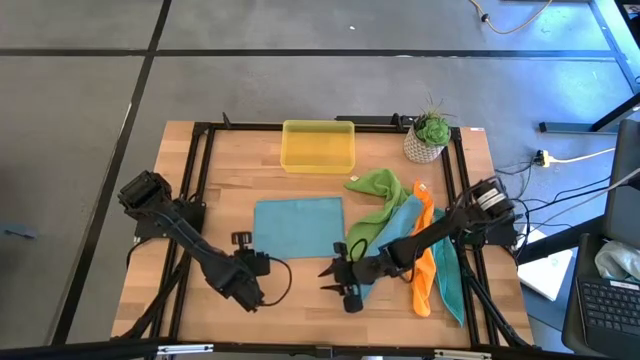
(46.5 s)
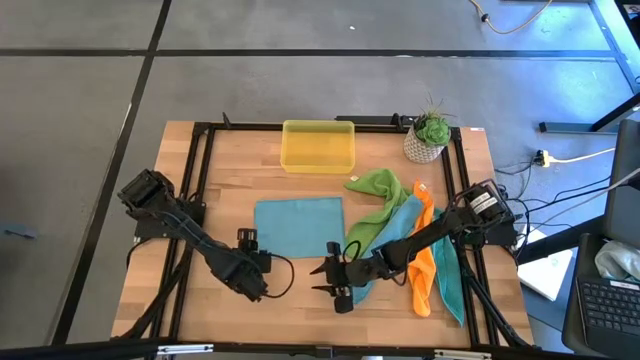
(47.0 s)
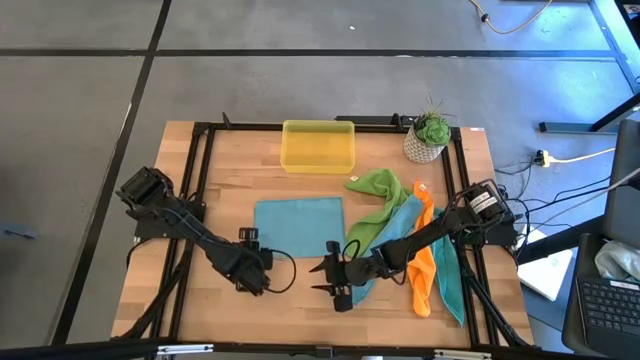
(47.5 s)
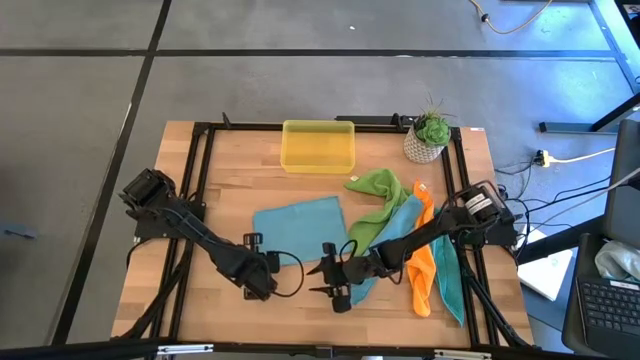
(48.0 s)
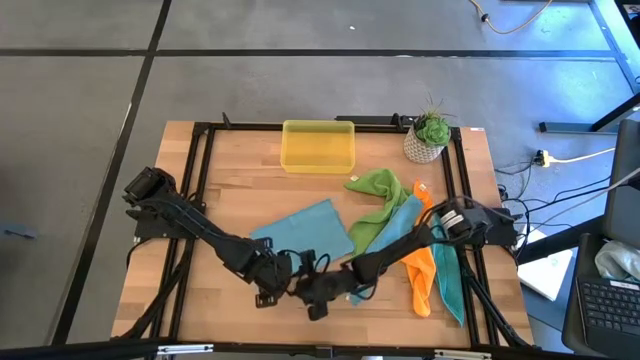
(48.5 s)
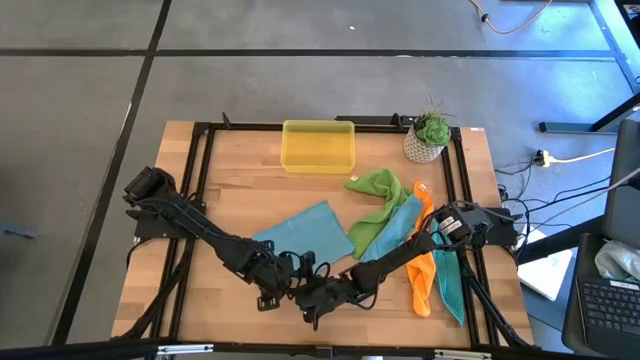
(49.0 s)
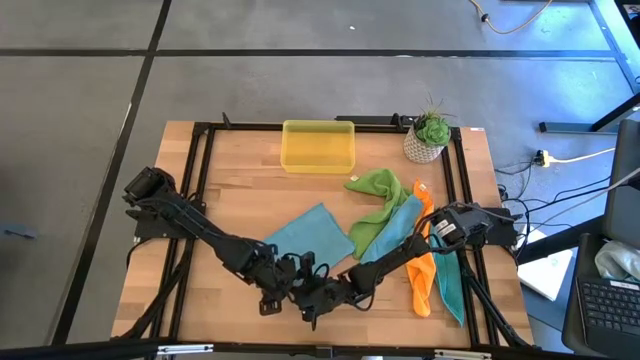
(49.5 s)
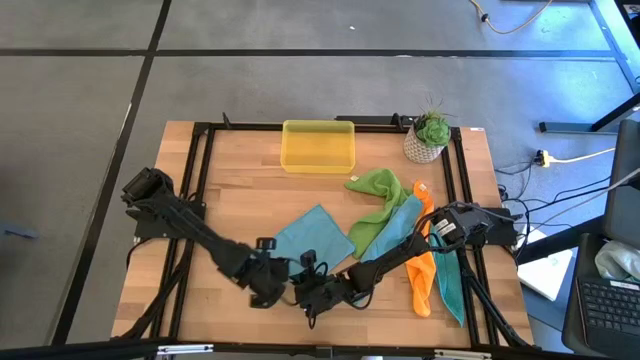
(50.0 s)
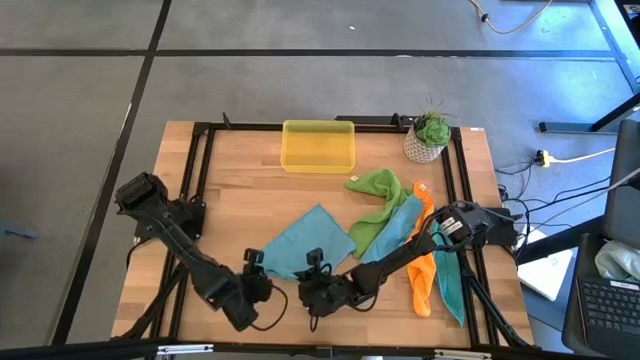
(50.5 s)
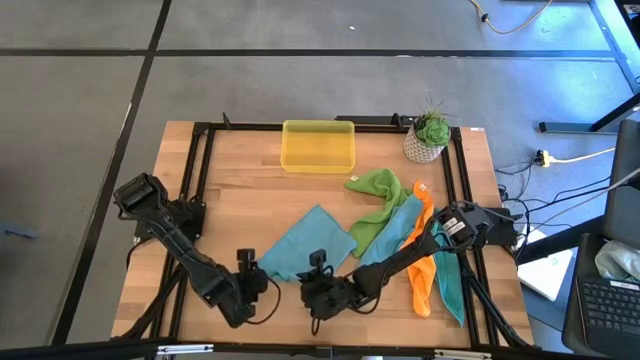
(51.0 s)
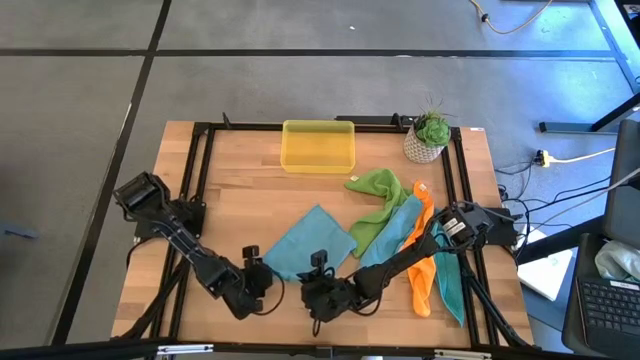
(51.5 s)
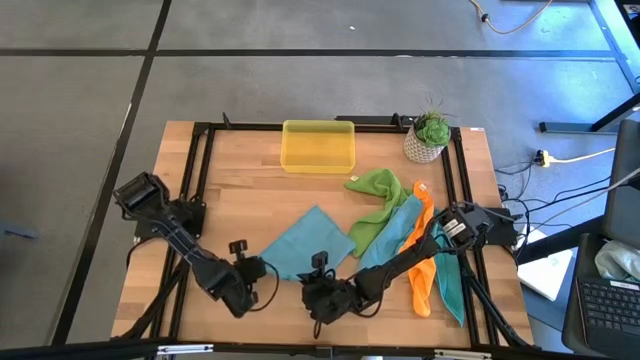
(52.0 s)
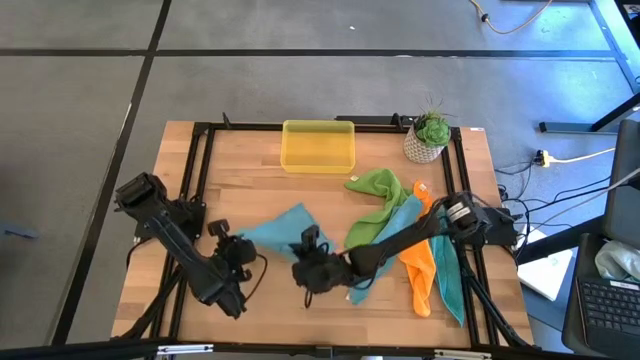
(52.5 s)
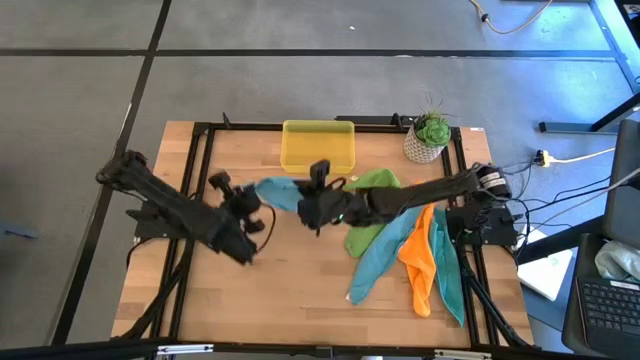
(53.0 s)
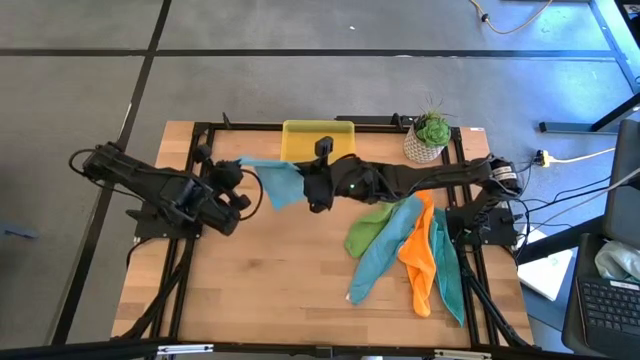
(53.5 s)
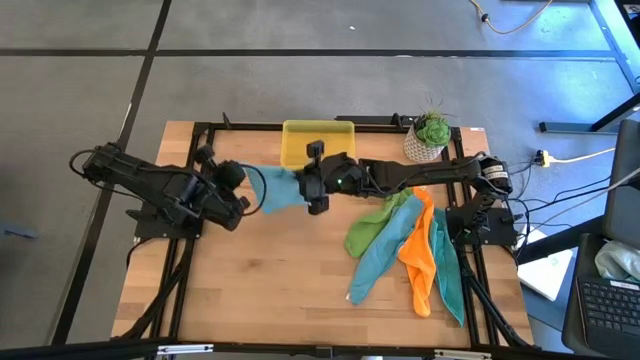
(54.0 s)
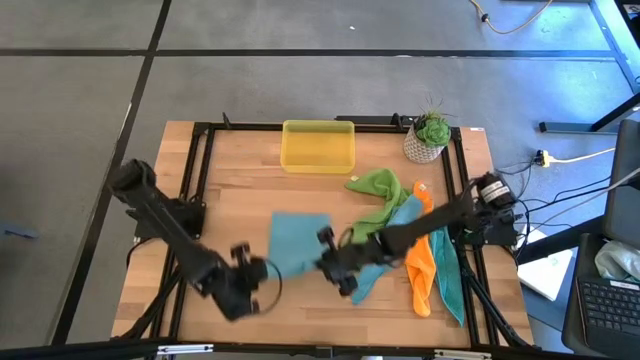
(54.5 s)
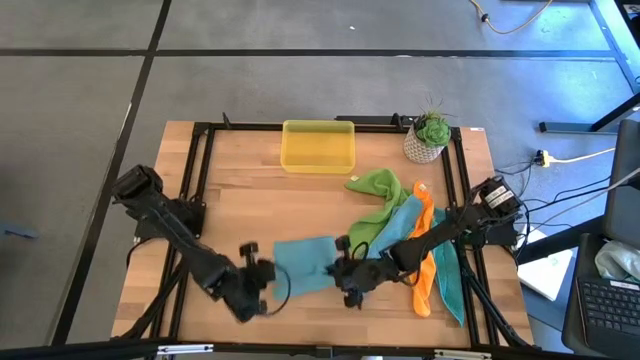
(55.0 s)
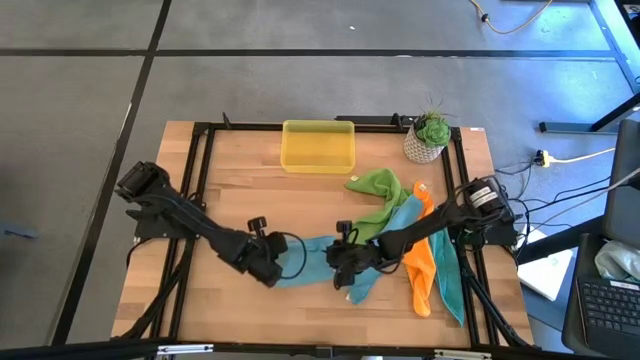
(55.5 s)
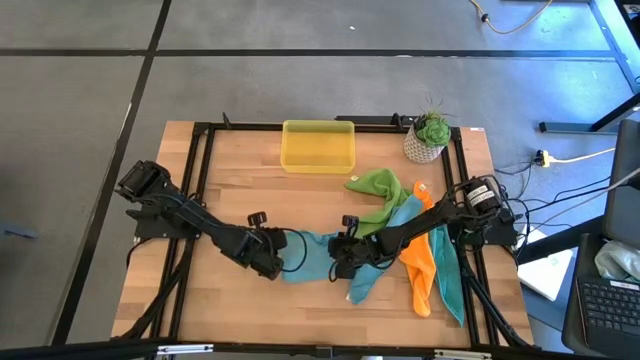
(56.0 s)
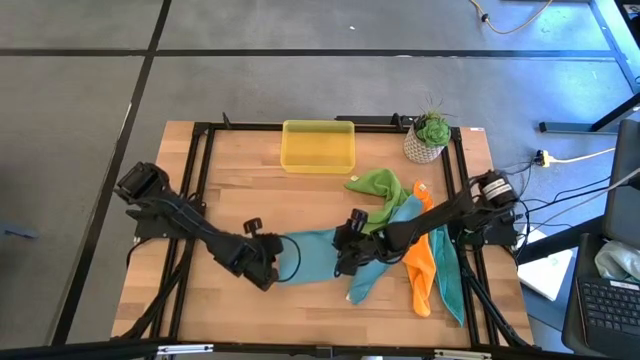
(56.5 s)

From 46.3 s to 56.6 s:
Task: Fold microfiber towels
Fold the left blue cloth

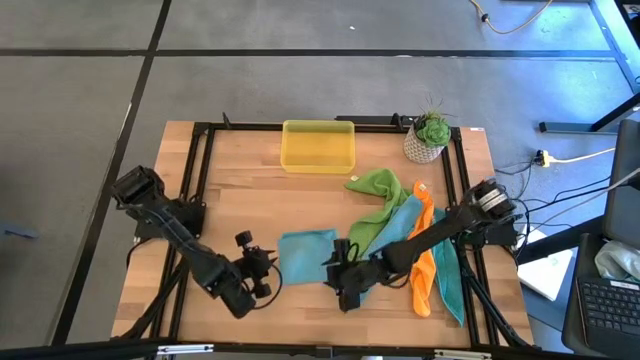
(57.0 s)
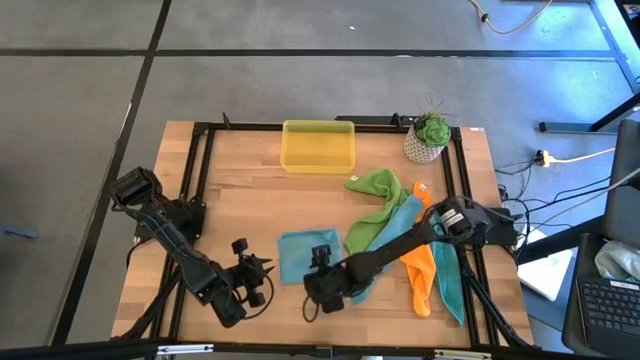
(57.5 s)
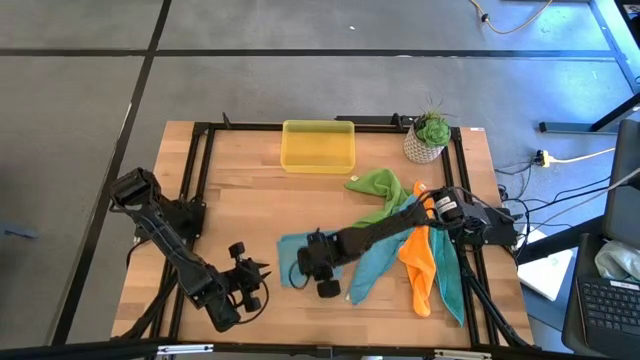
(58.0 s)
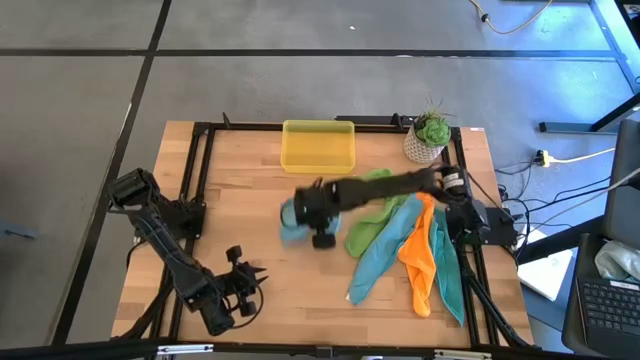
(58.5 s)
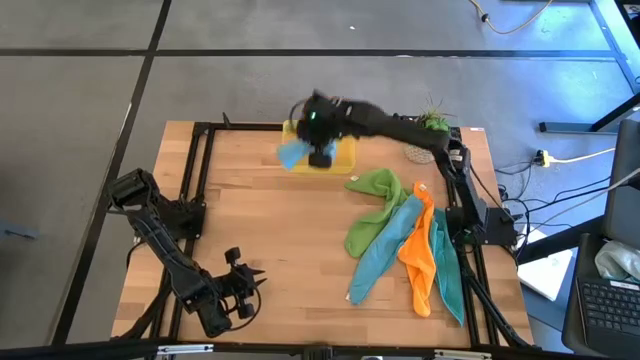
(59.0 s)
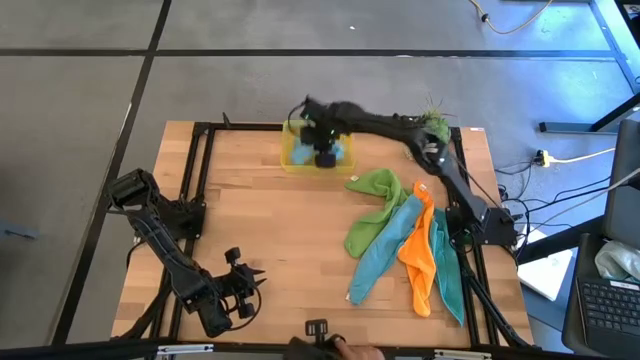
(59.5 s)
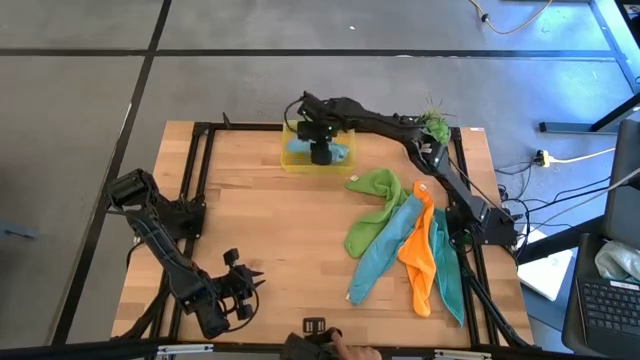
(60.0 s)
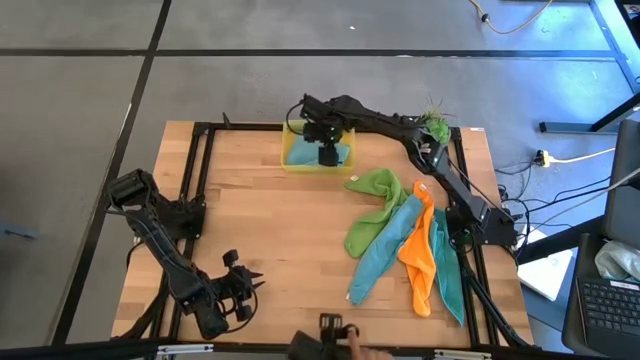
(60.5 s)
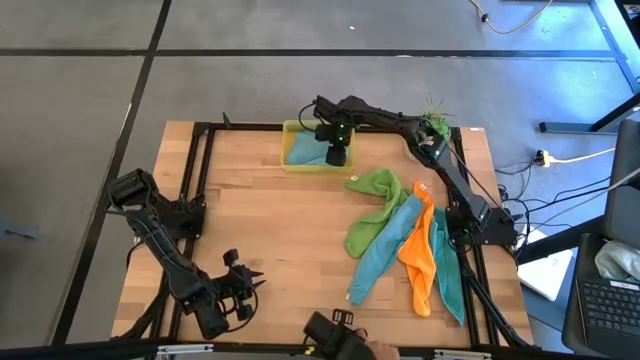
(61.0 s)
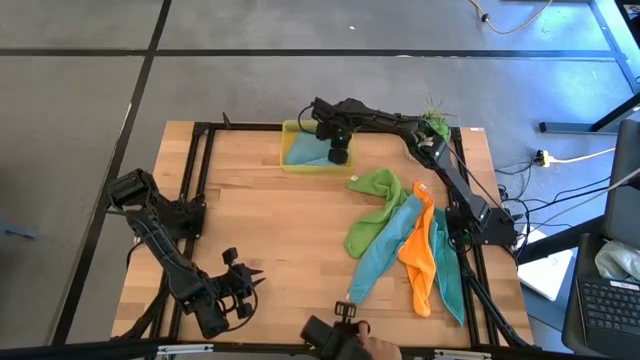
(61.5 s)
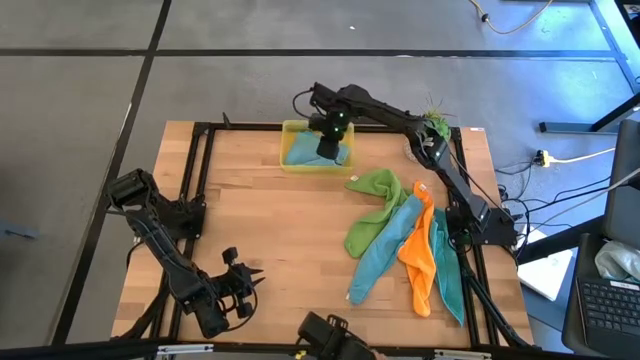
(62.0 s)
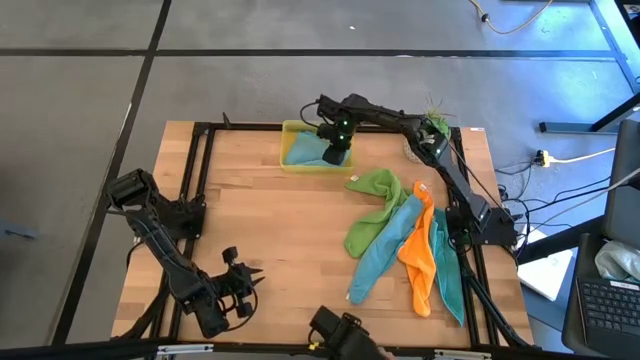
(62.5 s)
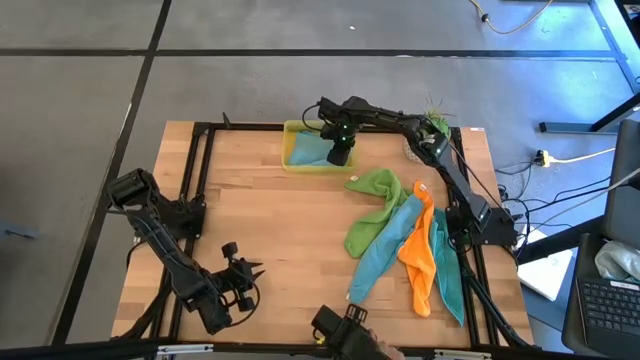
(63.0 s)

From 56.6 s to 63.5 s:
Put the blue folded cloth into the yellow bin

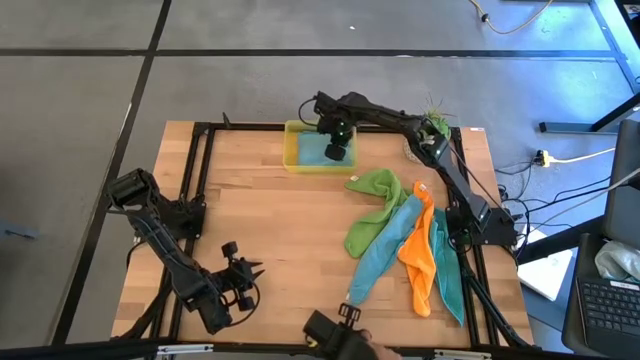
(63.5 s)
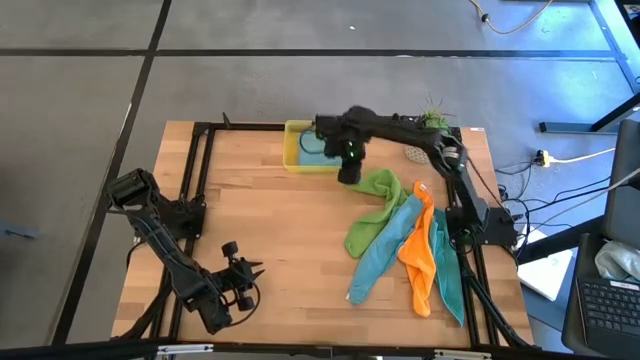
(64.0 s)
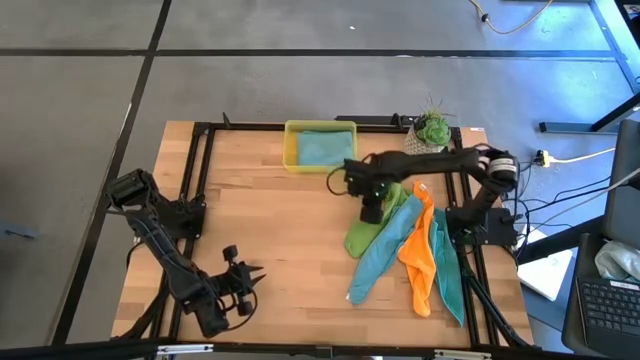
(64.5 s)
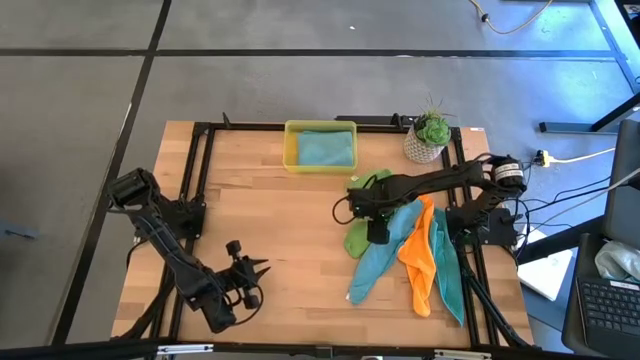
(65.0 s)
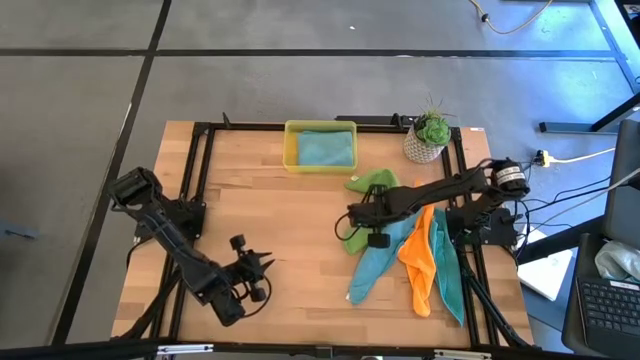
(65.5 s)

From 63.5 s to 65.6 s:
Fold the green cloth

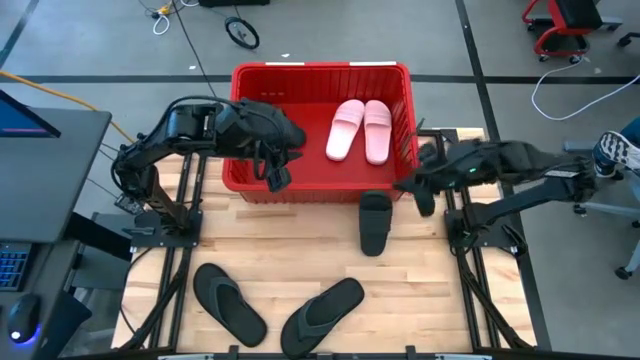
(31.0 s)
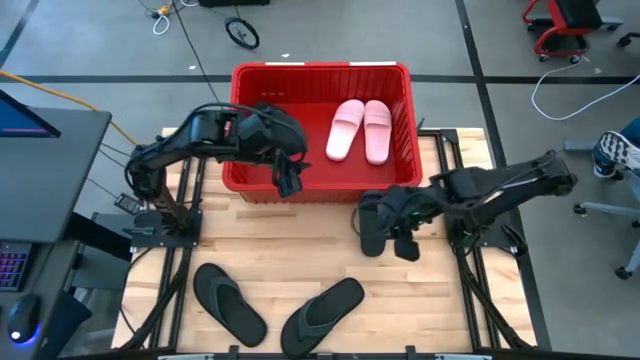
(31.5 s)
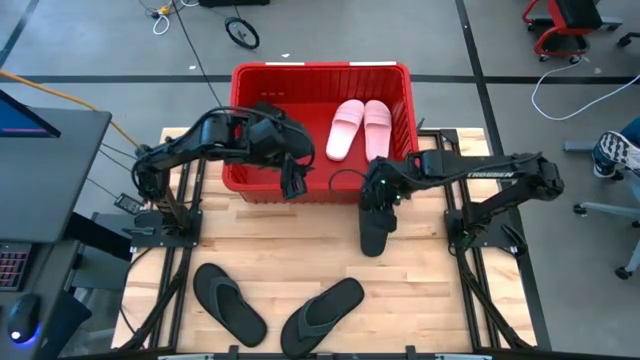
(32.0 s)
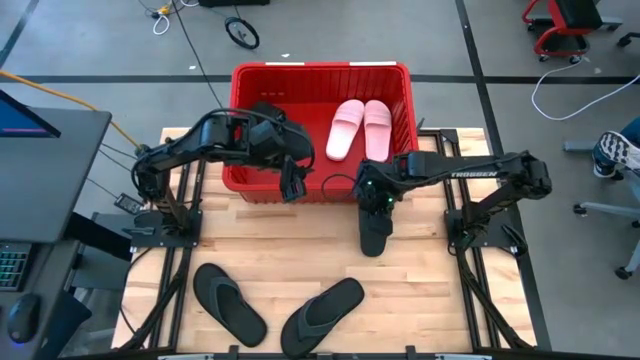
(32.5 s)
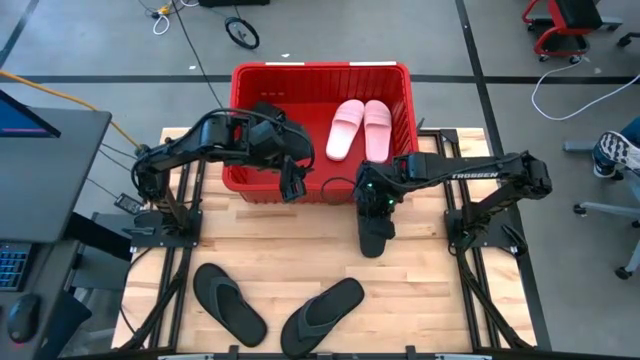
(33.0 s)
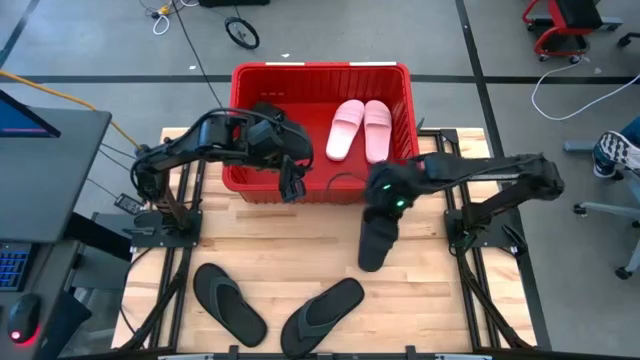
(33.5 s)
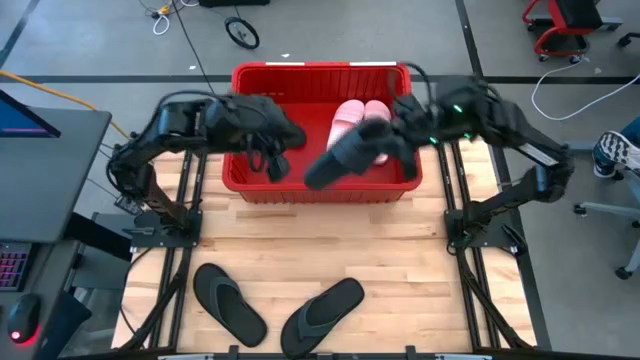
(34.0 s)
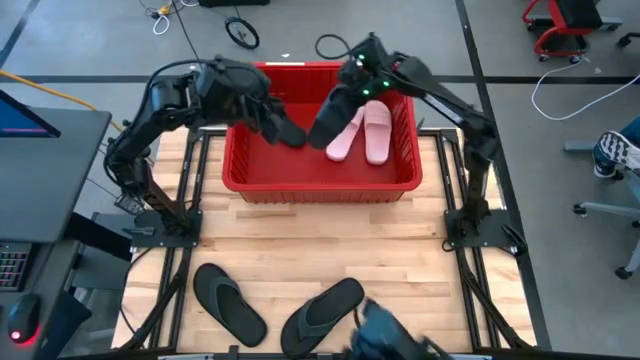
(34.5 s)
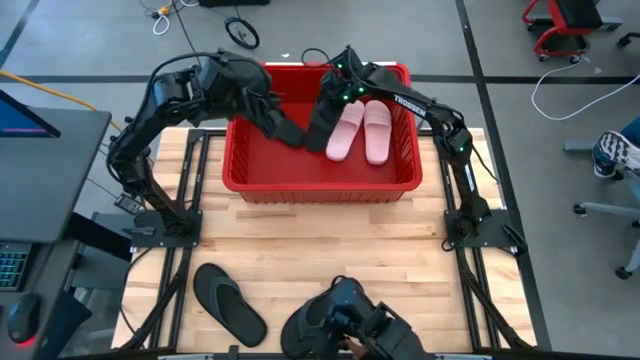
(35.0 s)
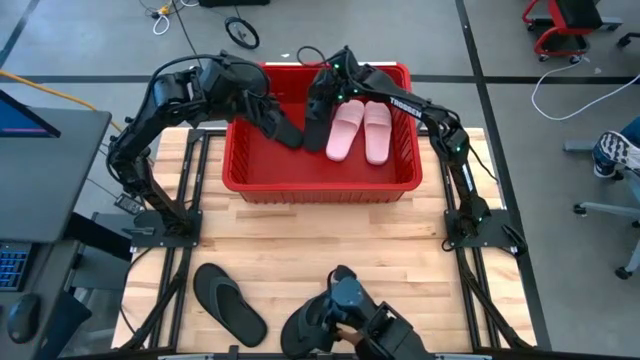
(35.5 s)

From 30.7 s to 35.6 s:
Task: Pick and place slides into bin
Put the black slide into the red bin
